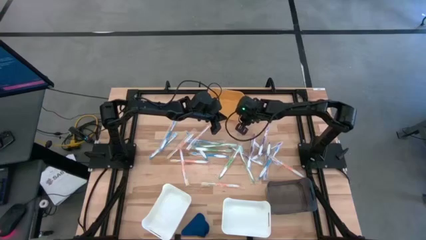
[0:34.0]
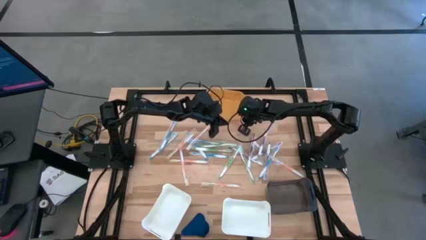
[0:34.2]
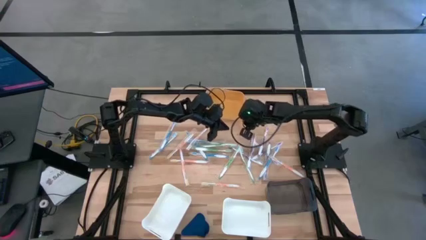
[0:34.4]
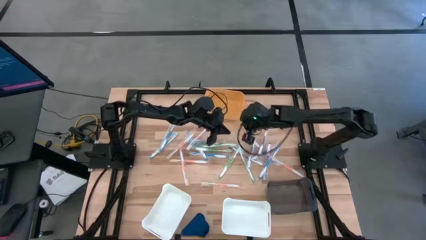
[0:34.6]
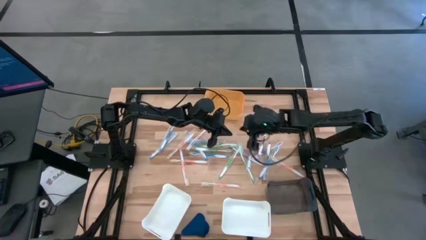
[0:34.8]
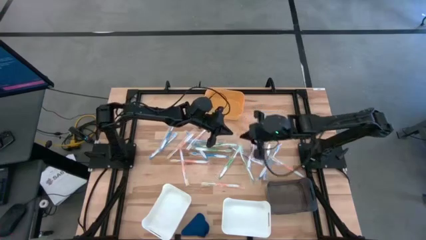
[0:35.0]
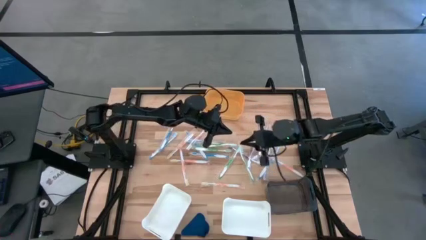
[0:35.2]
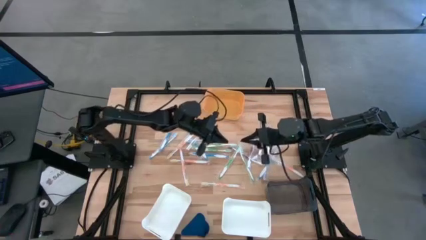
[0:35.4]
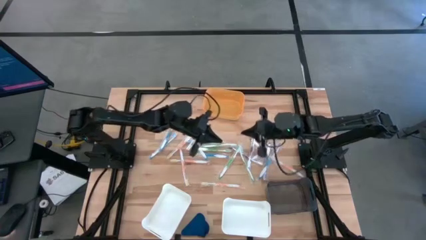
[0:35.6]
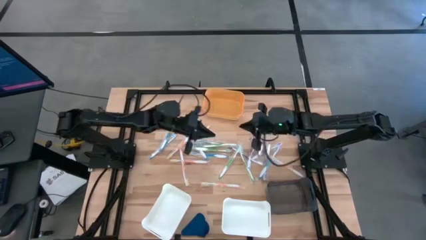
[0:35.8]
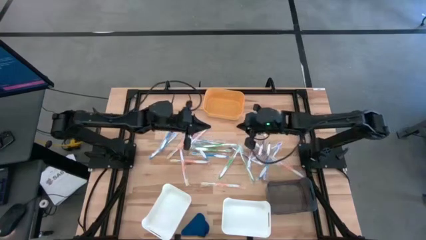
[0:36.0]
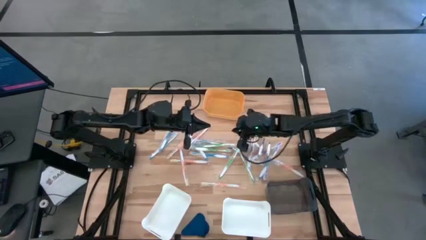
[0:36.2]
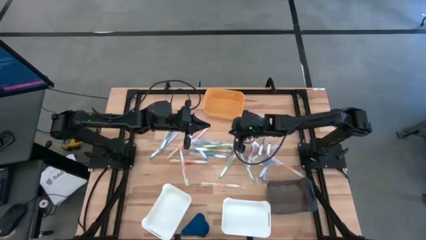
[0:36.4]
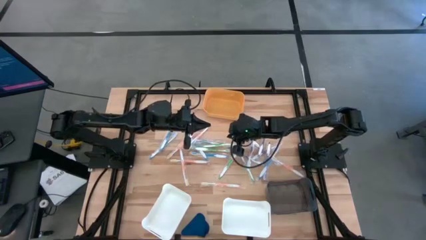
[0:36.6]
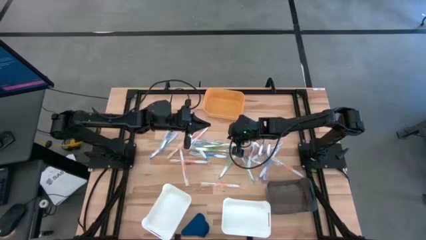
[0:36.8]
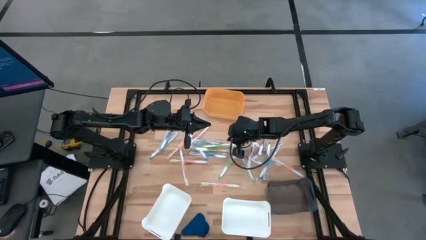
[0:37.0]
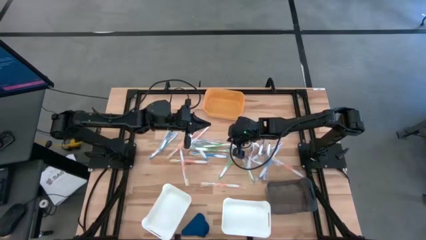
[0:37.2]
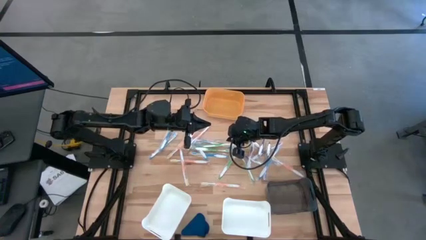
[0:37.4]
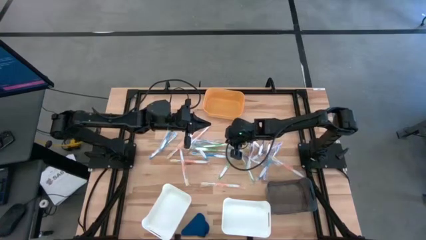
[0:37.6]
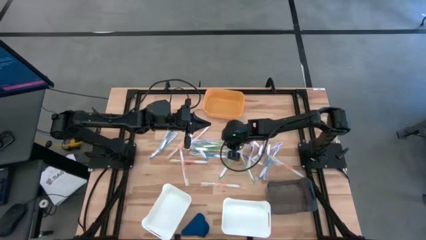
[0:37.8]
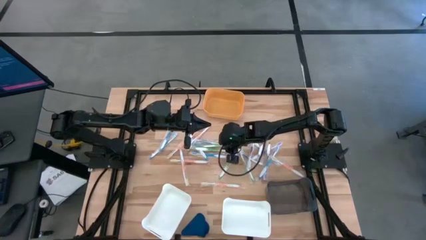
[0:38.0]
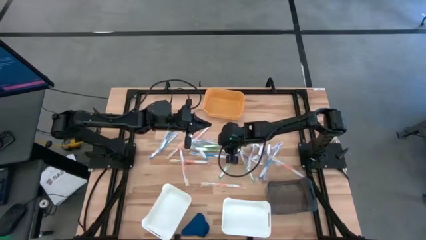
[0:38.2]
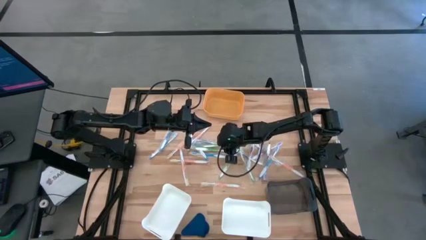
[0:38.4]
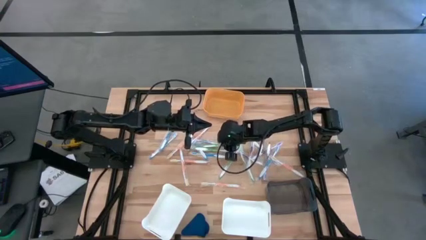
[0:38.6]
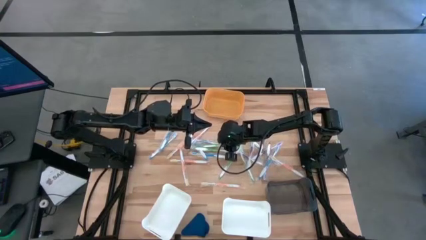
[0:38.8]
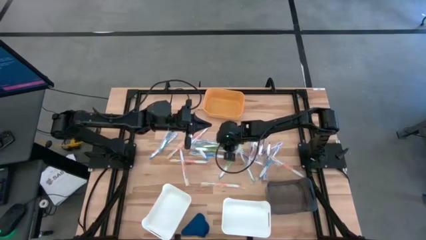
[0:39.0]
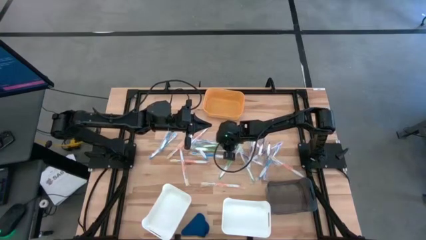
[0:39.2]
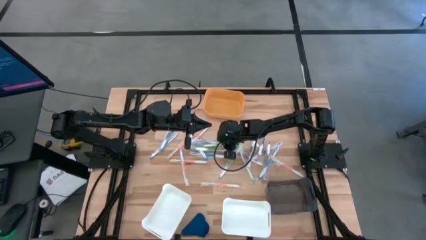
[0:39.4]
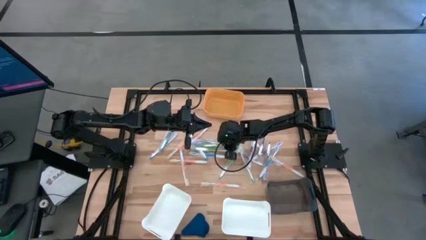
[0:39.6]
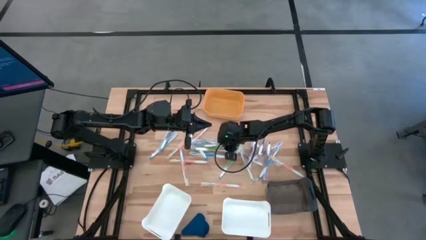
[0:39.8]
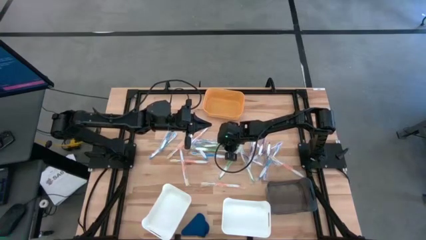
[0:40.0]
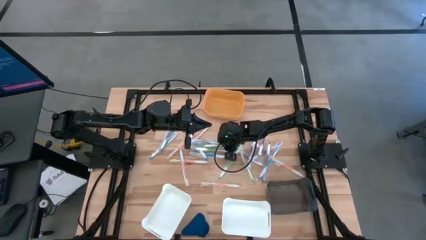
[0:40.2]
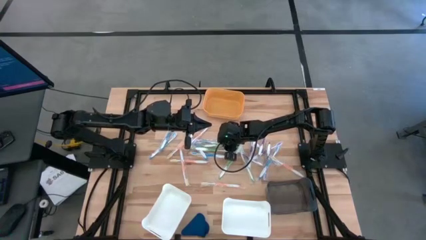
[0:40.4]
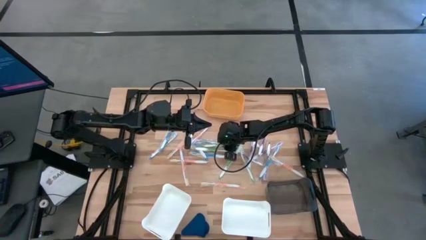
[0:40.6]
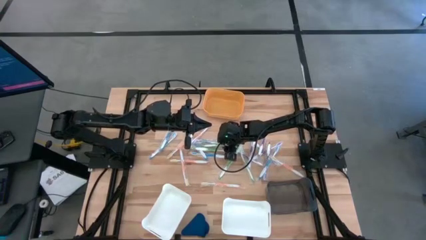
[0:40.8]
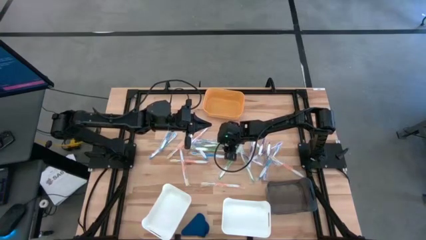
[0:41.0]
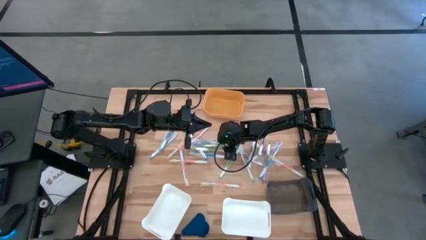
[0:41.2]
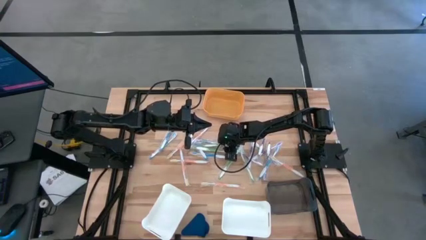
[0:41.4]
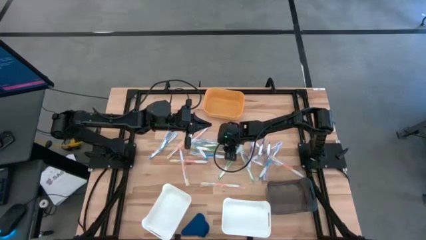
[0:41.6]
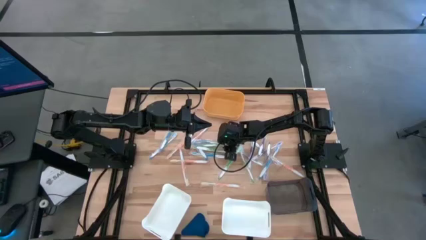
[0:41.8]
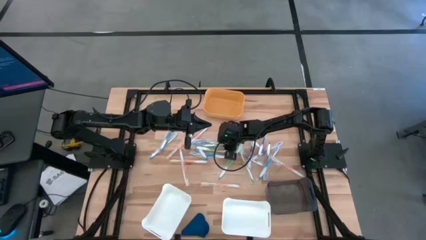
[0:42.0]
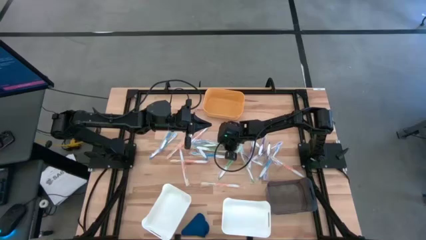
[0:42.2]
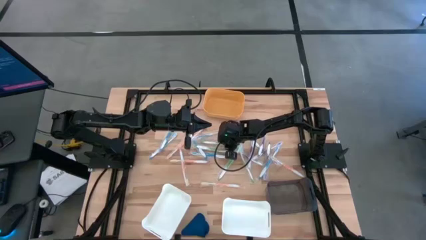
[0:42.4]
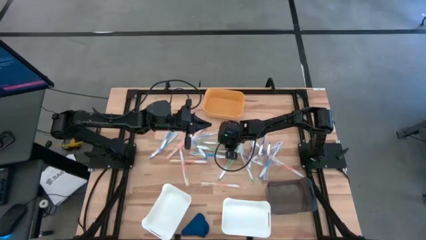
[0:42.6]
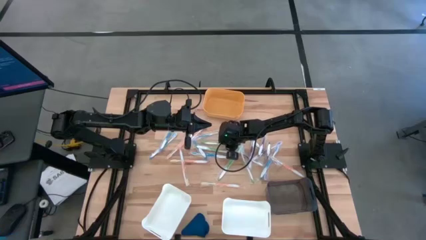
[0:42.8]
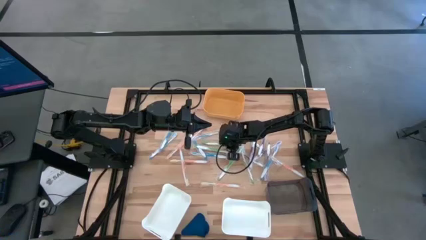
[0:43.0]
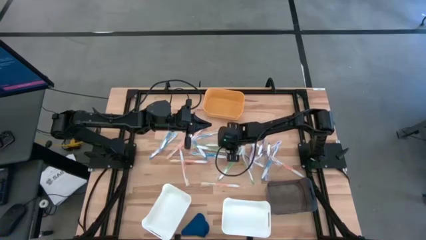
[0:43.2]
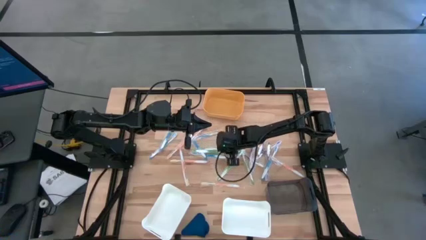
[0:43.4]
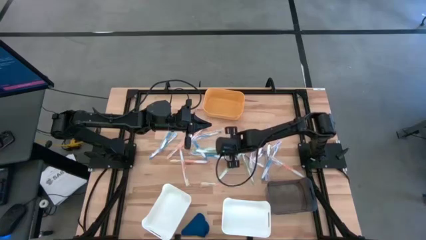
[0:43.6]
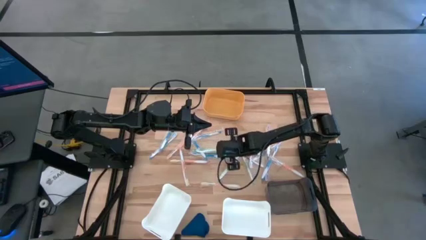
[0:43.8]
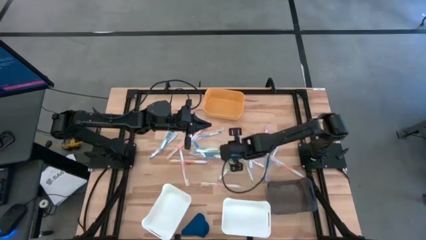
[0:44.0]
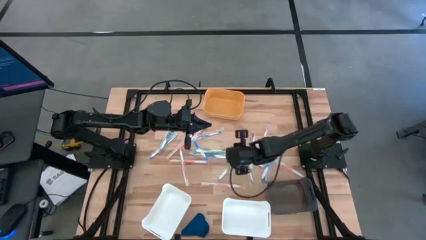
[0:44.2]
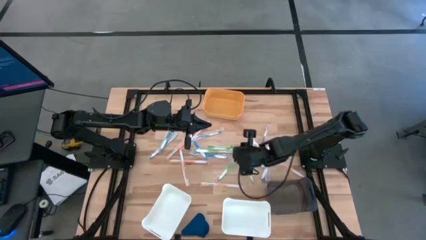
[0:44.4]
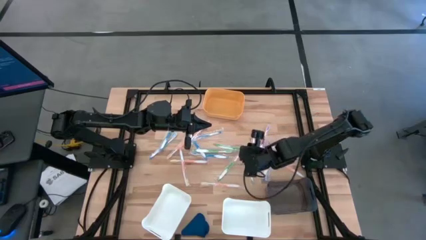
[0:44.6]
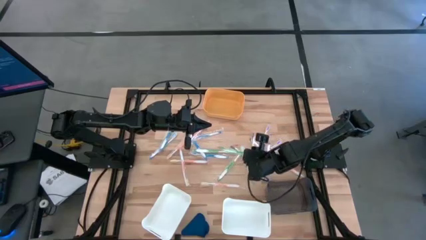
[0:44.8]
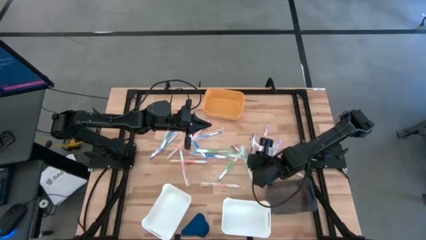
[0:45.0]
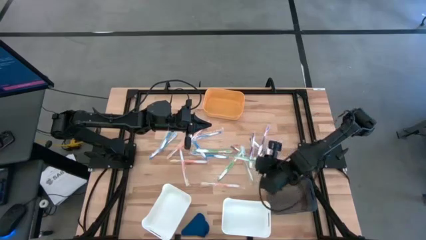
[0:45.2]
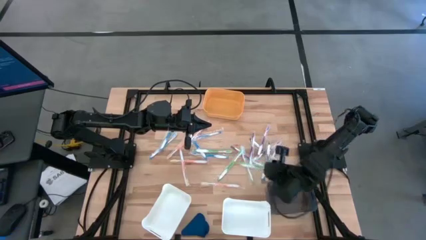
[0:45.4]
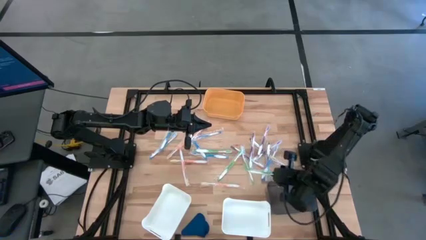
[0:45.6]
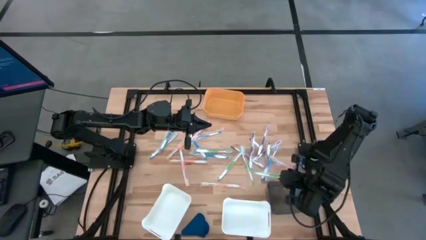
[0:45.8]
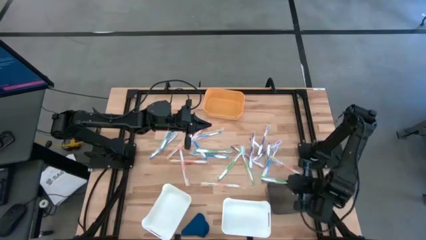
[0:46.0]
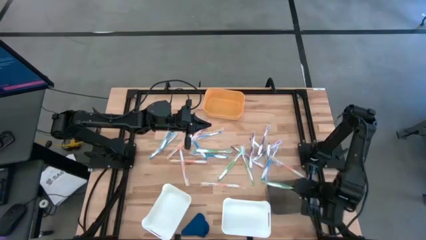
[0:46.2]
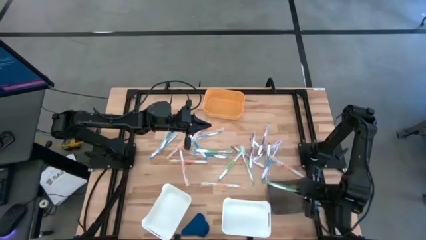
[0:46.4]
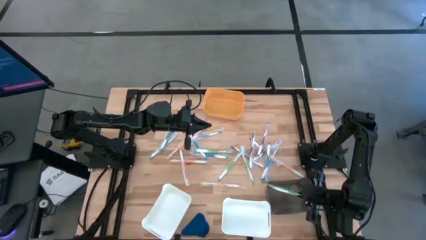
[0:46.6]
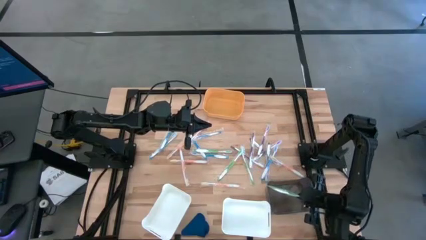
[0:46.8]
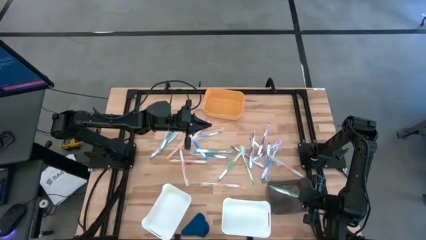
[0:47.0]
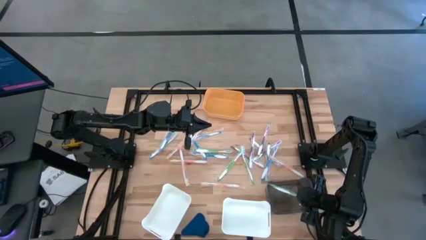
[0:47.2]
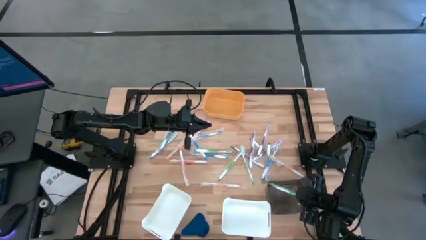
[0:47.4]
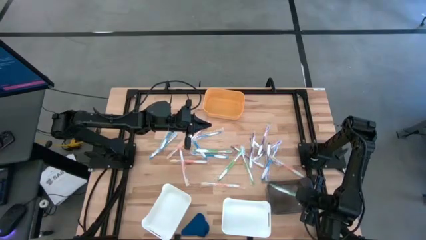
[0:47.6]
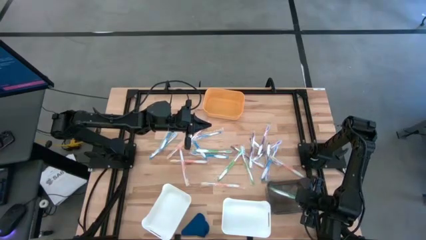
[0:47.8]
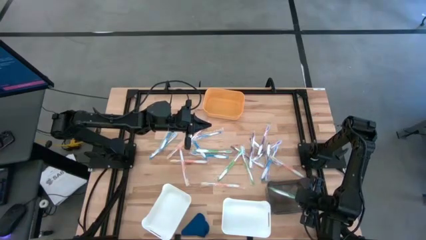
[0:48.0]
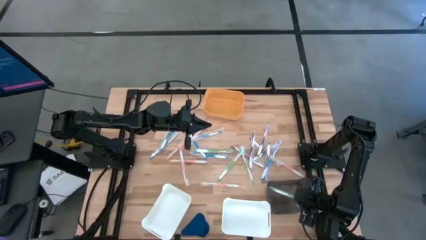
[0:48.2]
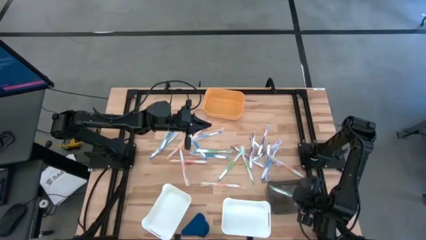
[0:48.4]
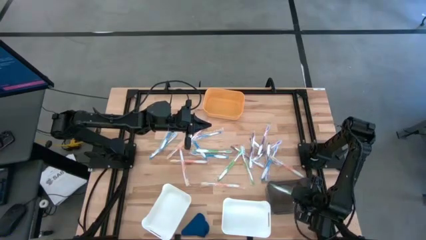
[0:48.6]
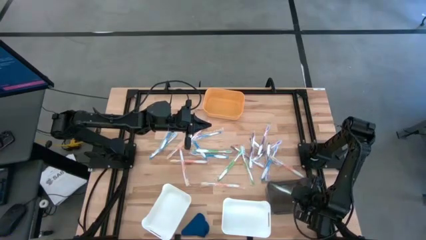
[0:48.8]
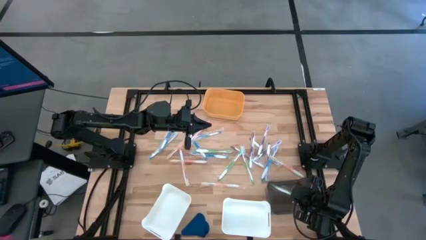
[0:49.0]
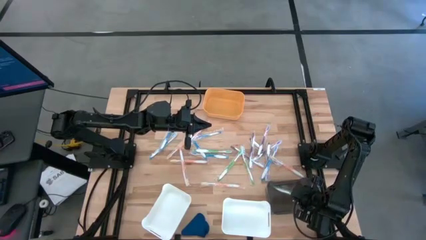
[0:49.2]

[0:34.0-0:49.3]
Task: Pick & Place Toothbrushes
Put the green toothbrush into the black bin

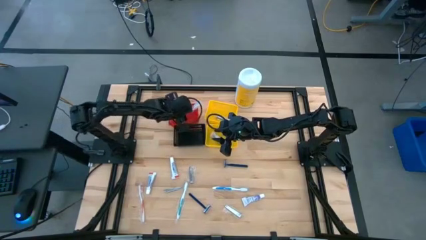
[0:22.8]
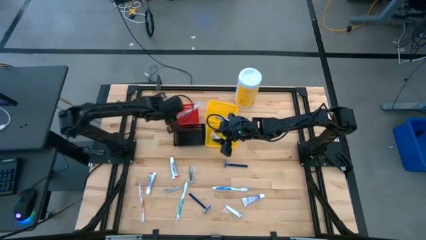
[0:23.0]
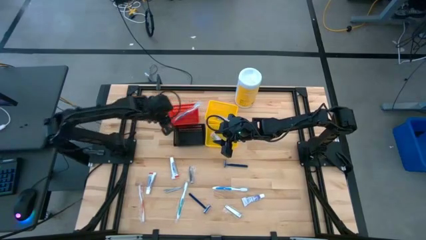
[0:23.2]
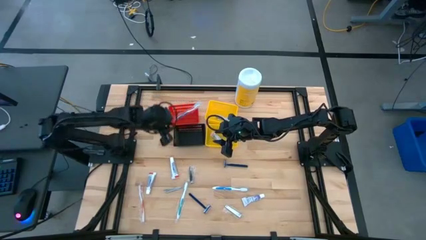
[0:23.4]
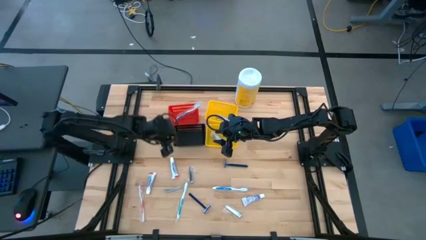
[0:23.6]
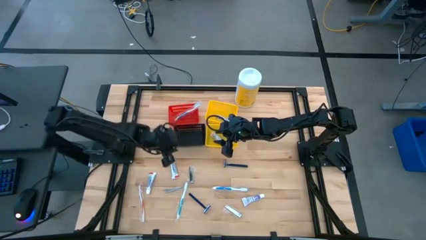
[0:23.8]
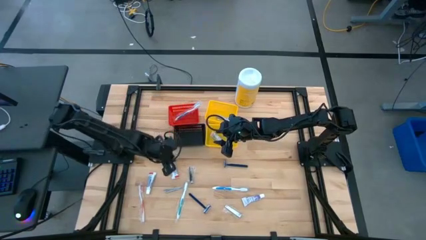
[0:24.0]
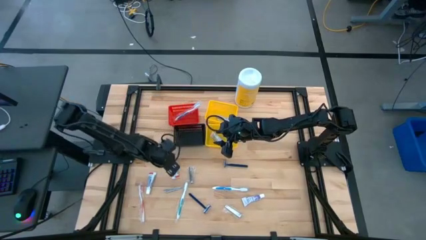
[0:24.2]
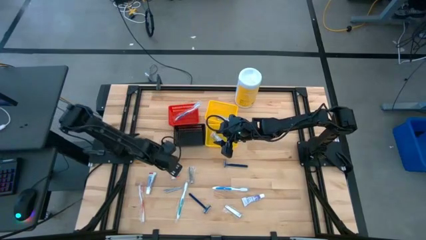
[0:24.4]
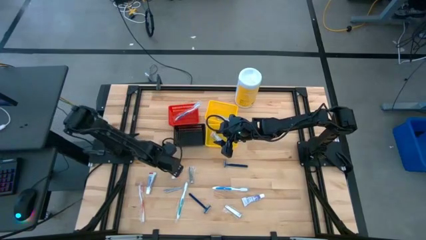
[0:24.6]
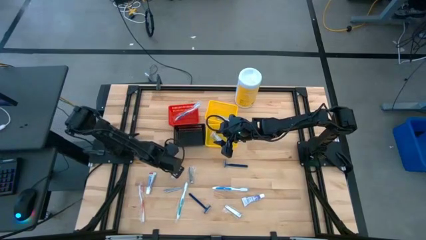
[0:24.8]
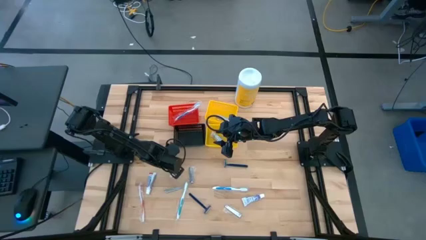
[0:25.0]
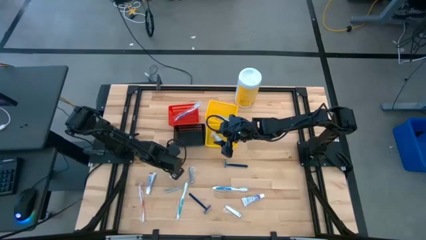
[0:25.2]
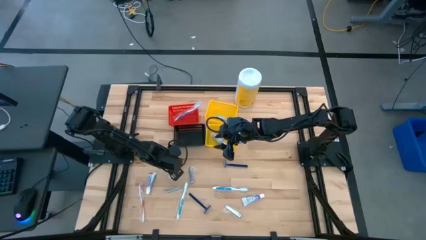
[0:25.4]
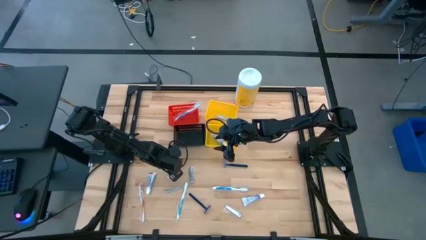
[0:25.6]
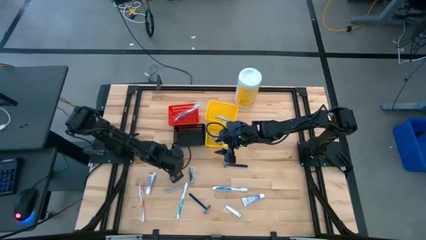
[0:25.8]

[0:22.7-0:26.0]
Task: Pick & Place Travel size toiletries
Put the white toothpaste into the bottom yellow bin
